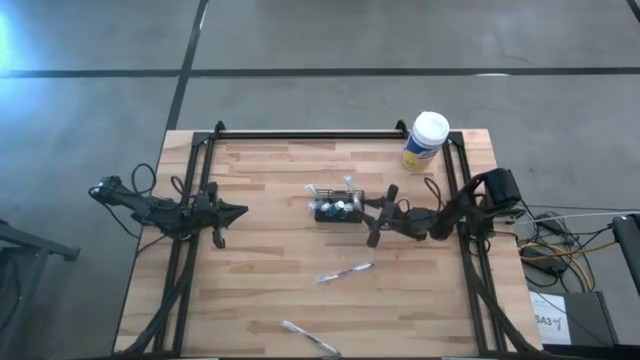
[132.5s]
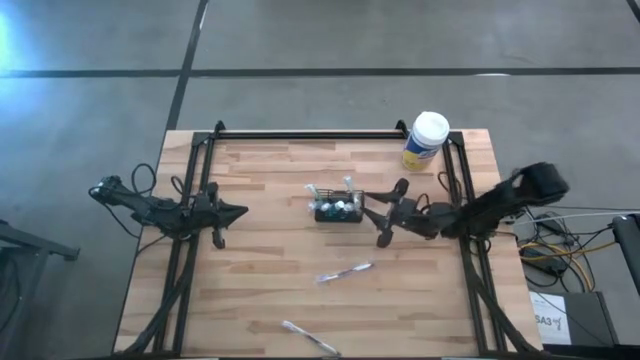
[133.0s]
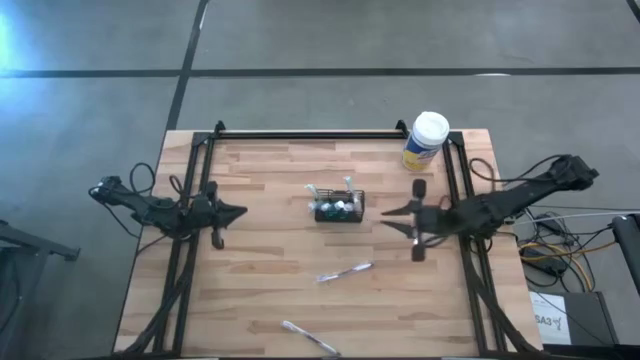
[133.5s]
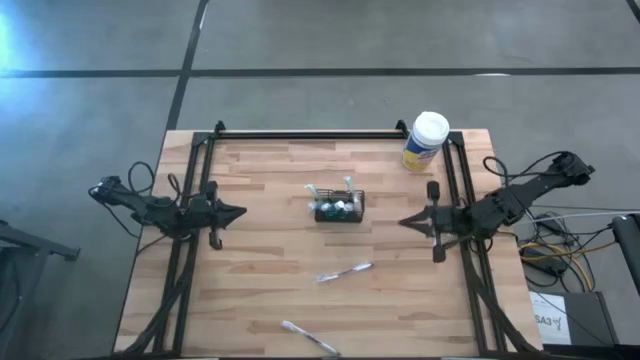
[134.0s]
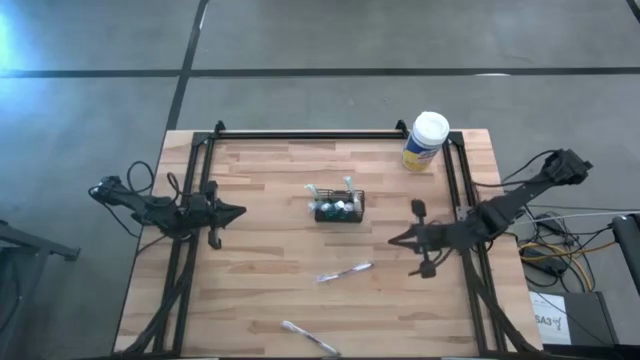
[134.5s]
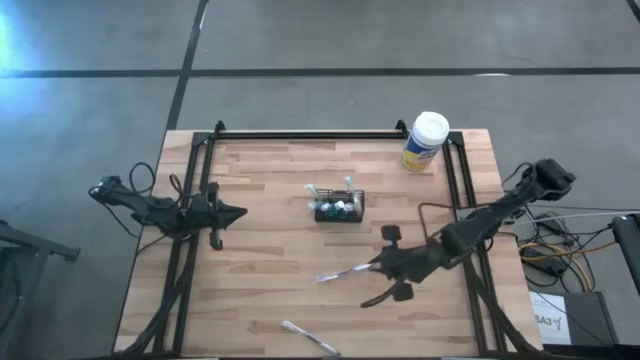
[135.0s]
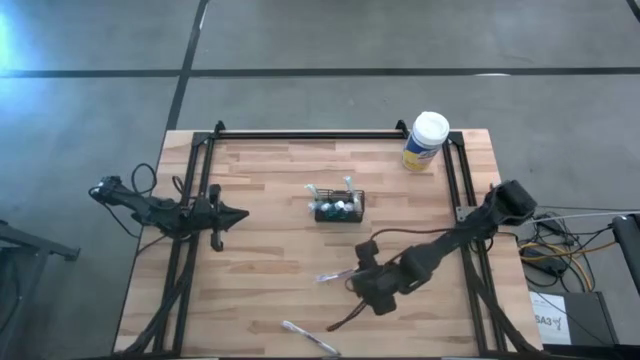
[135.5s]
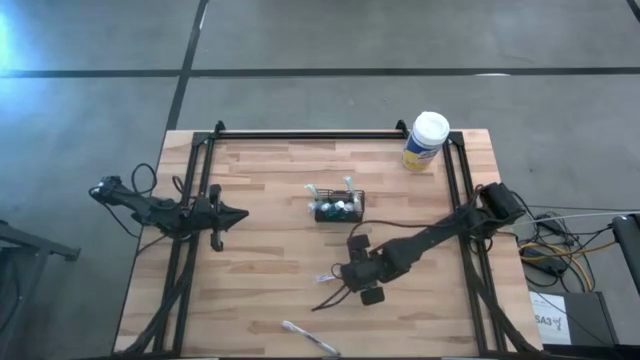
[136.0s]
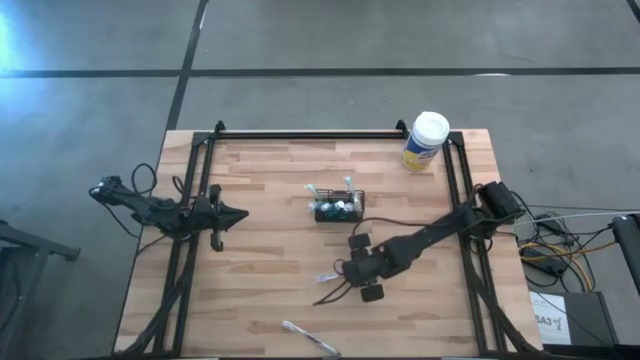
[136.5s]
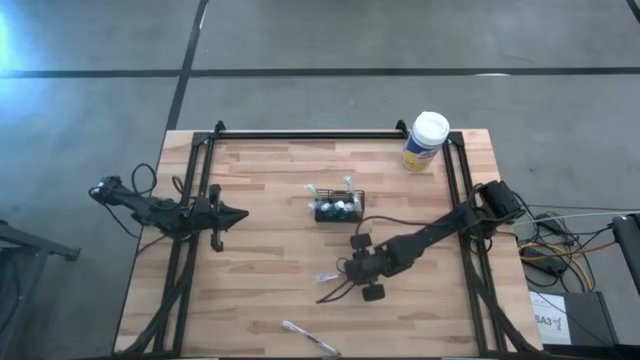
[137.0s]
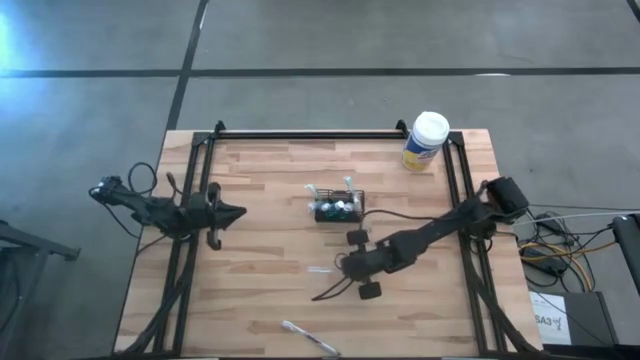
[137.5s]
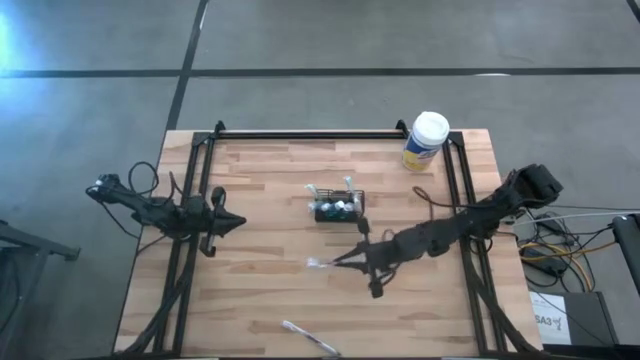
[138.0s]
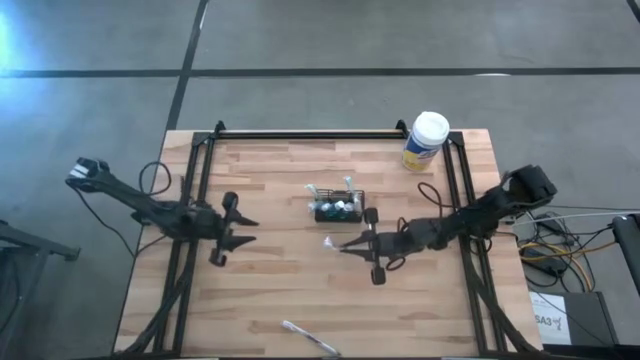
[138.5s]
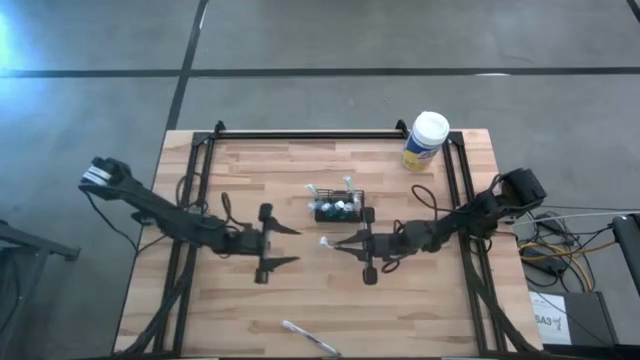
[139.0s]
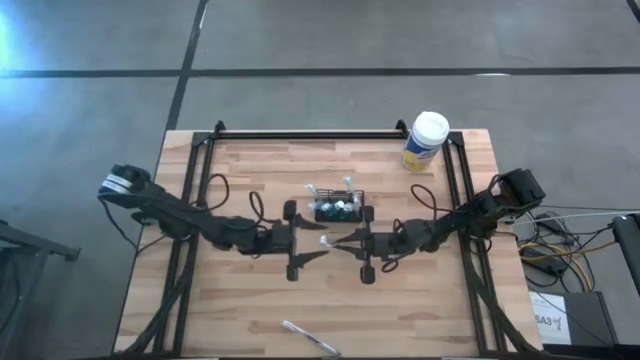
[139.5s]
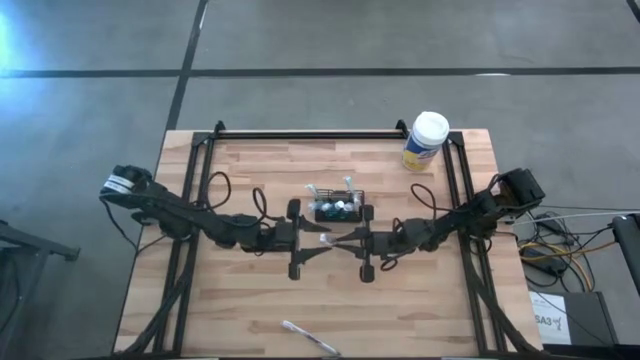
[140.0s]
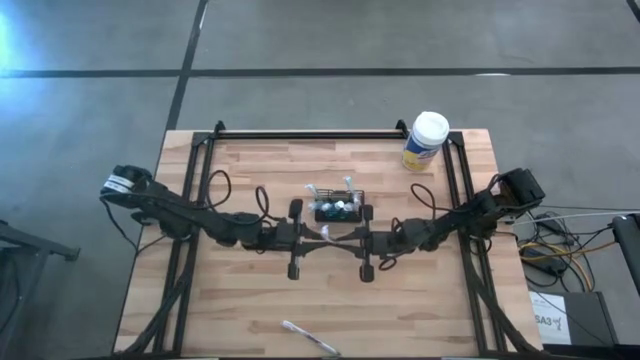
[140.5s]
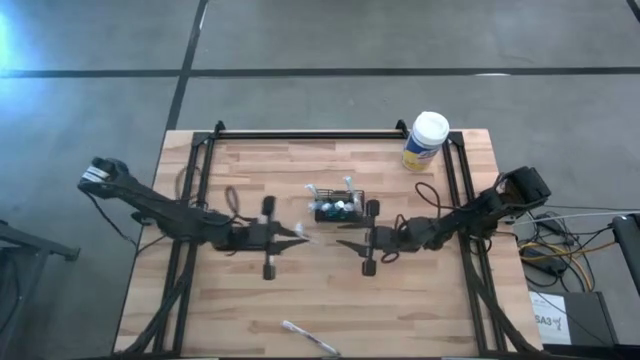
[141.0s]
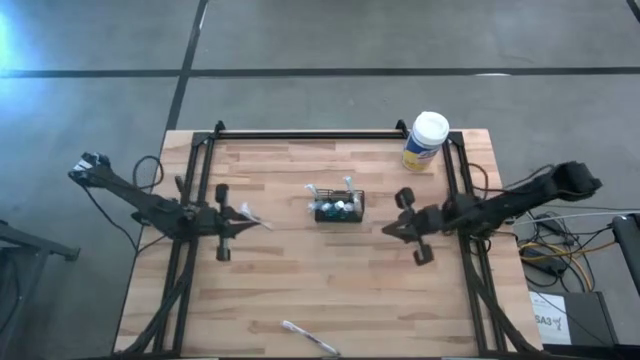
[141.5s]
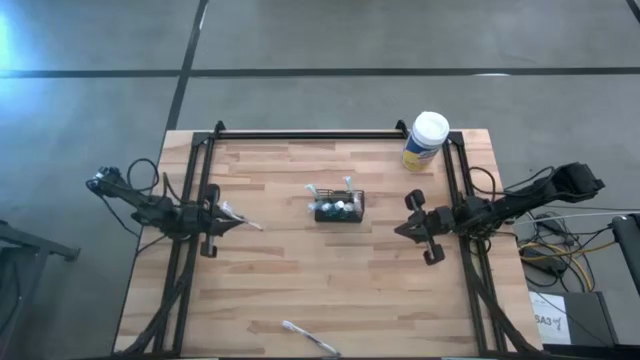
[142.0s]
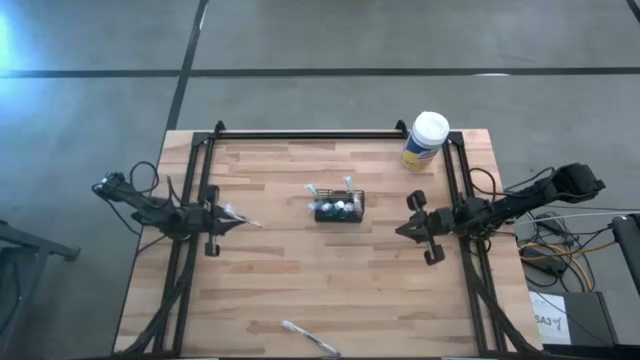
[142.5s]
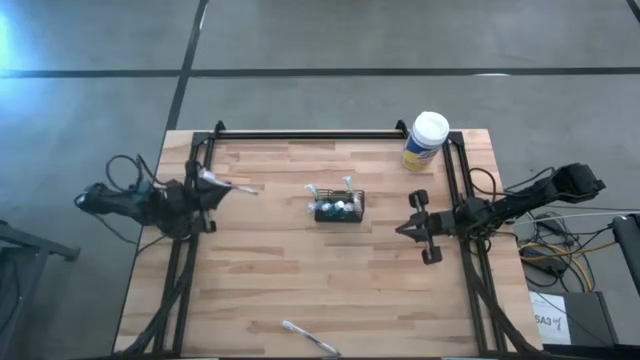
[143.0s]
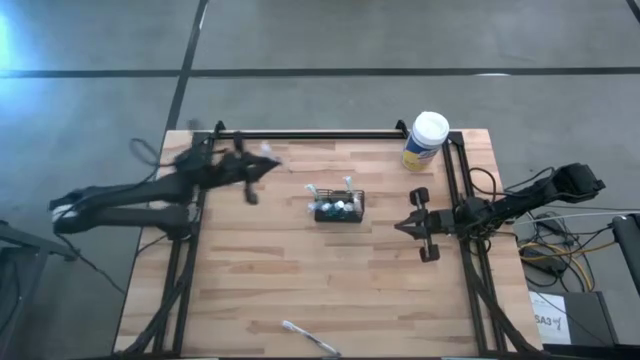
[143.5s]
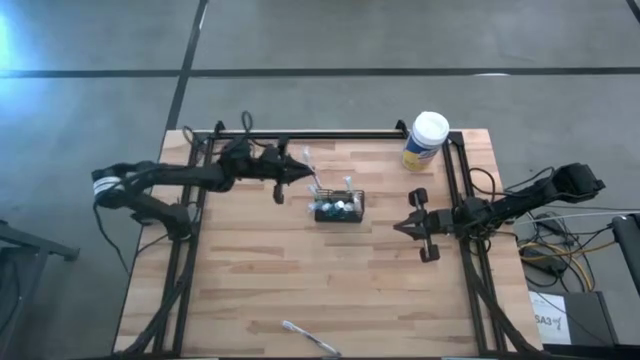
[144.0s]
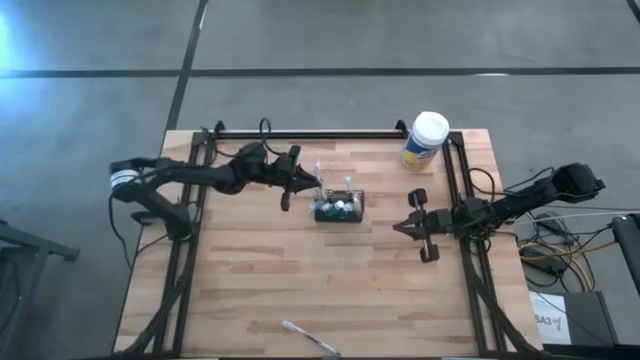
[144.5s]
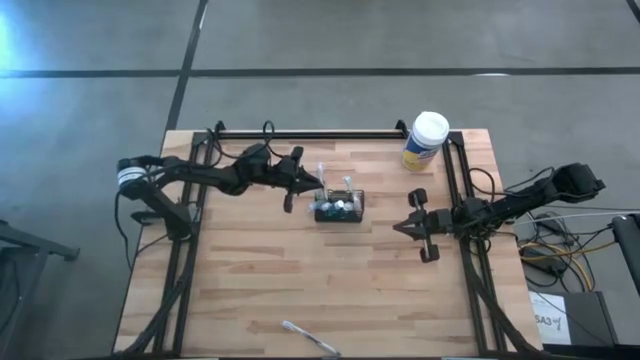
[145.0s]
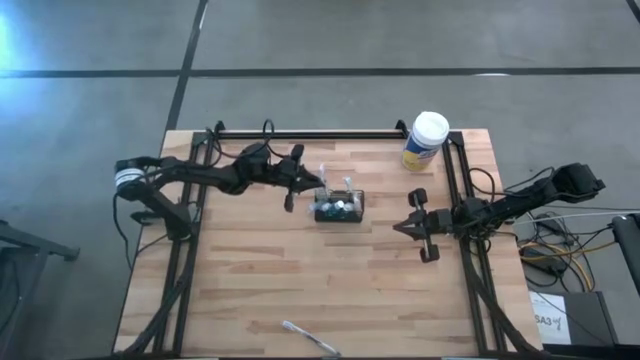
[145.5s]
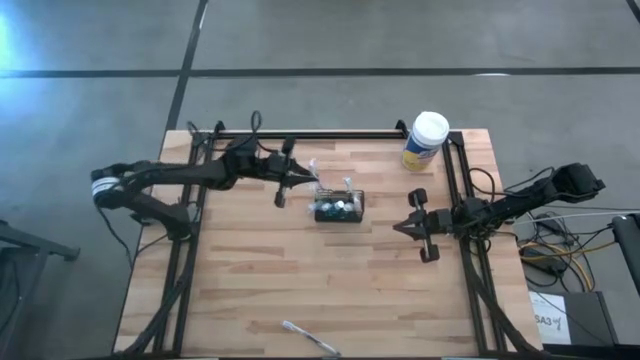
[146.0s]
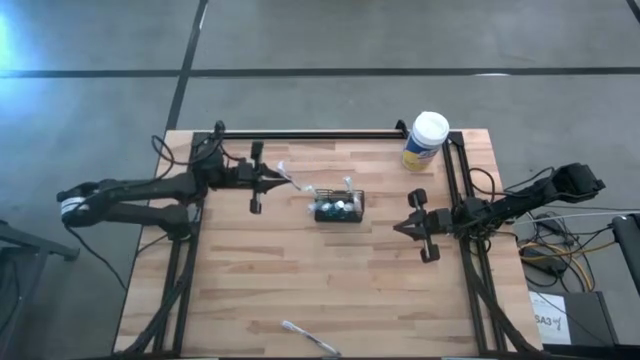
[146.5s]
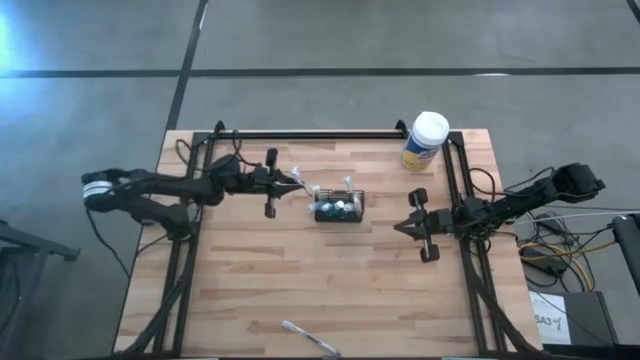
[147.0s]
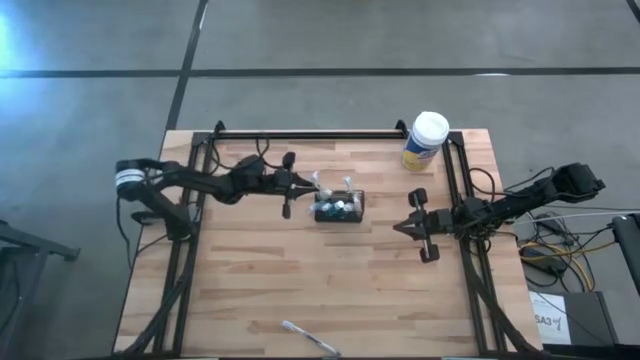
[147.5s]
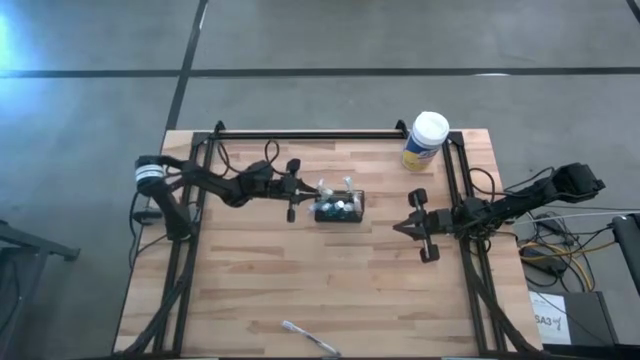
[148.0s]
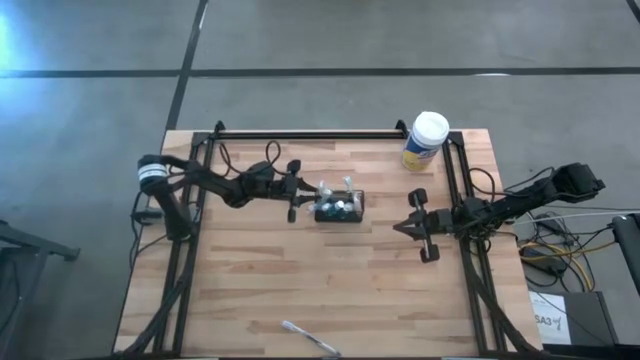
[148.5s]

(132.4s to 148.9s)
Task: Pick & Place toothbrushing station
Put the top violet toothbrush into the black wire organizer

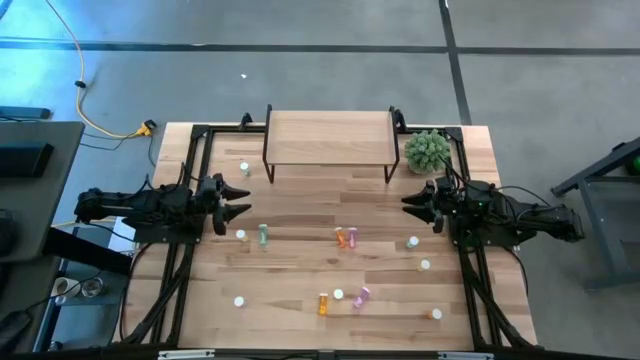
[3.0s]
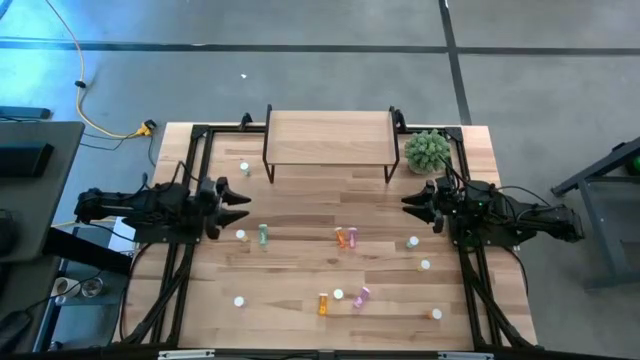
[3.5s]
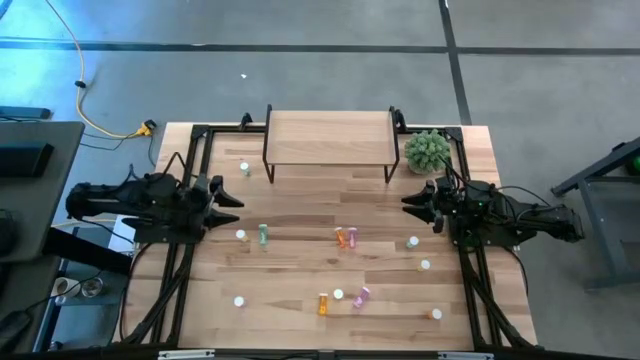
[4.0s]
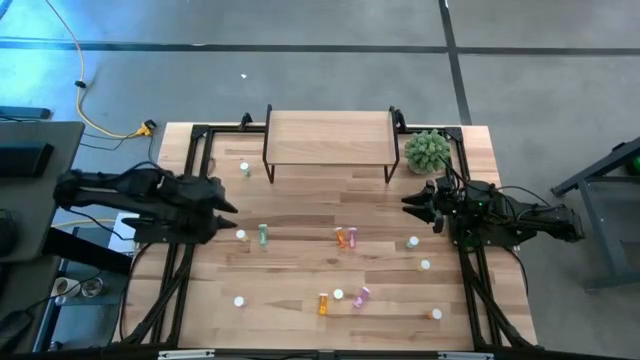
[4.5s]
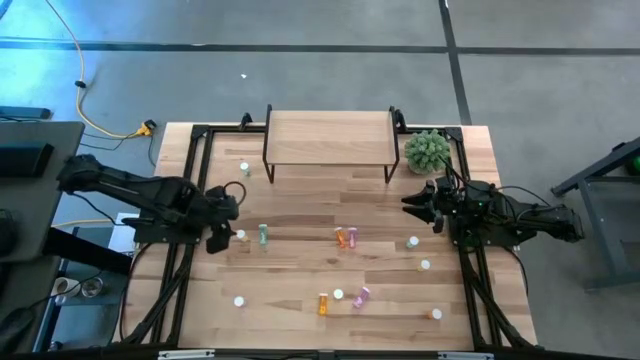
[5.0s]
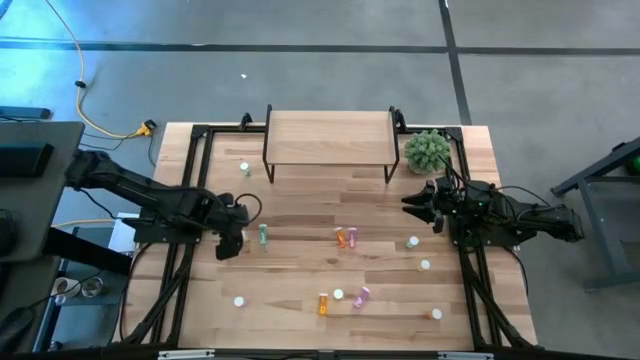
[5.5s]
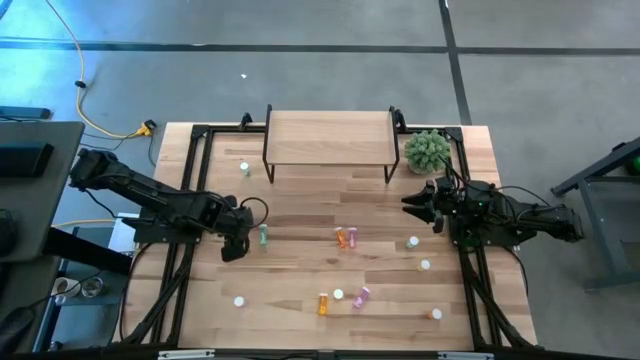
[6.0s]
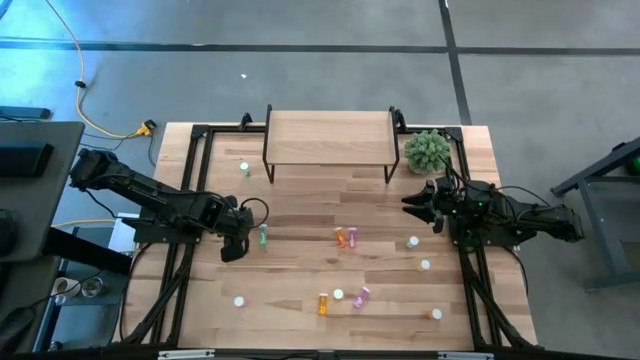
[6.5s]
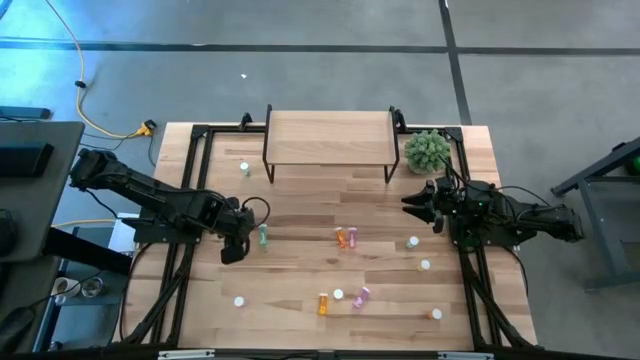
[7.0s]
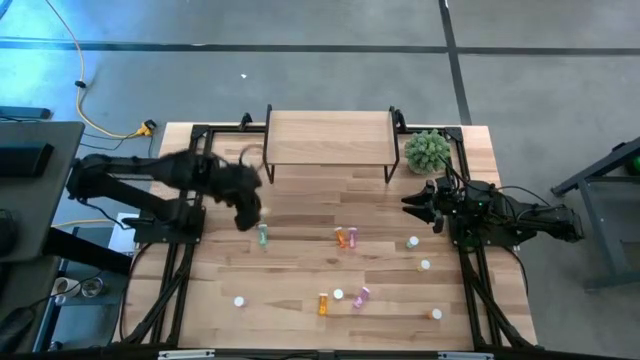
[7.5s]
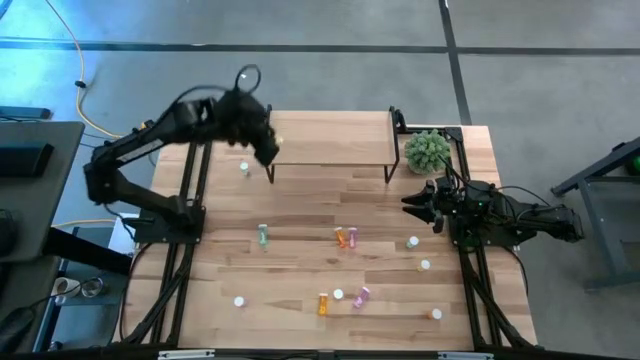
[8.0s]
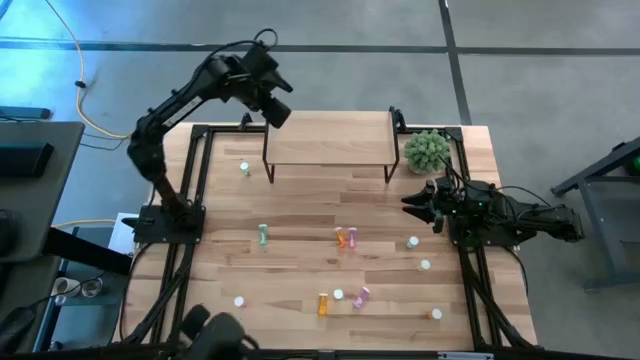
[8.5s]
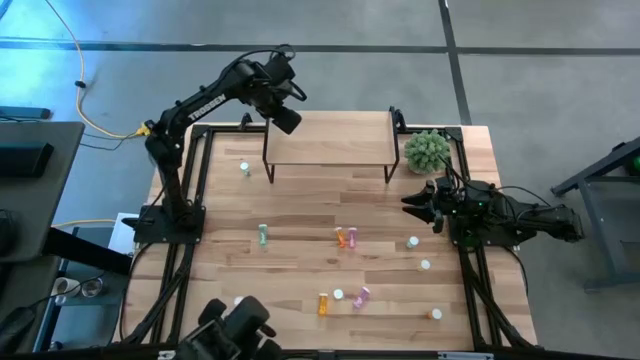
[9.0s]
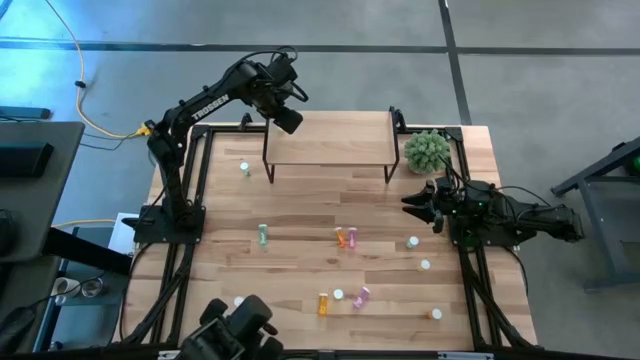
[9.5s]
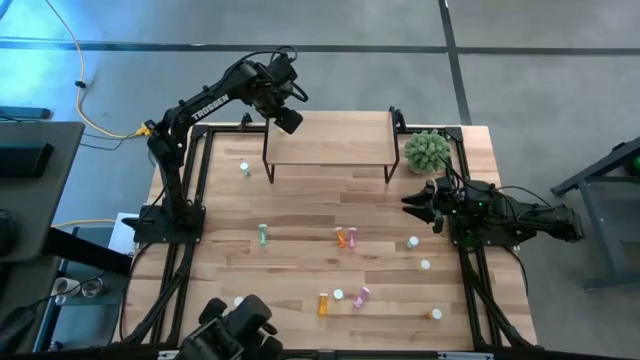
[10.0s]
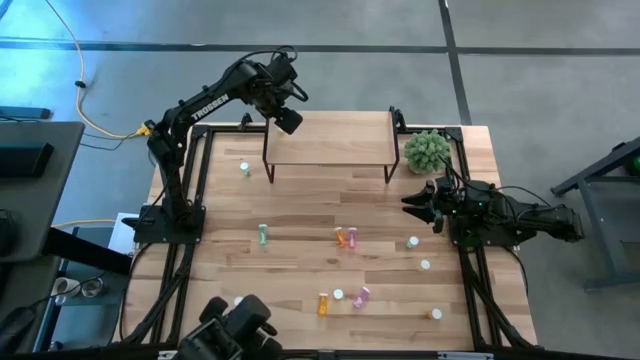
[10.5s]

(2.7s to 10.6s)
Task: Pick and place medicine bottles onto shelf by color
Put the top yellow pill bottle on the shelf
